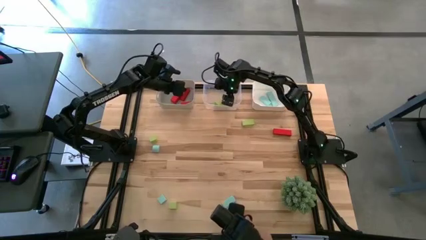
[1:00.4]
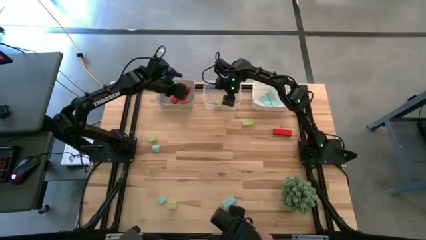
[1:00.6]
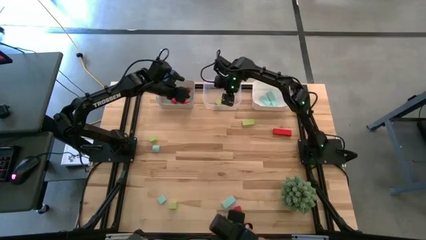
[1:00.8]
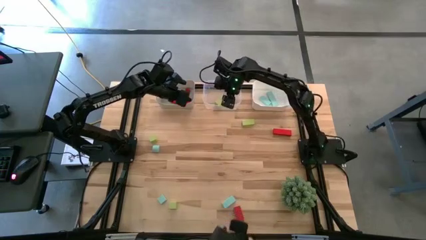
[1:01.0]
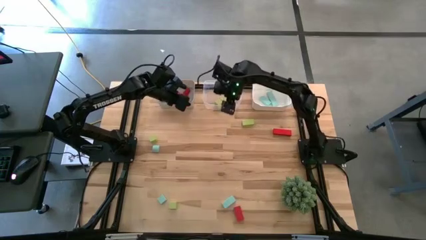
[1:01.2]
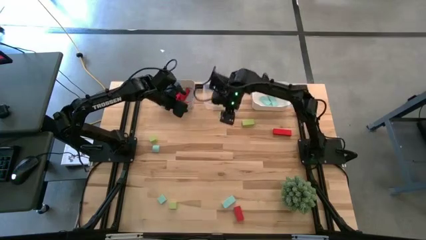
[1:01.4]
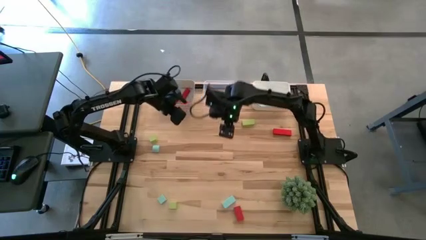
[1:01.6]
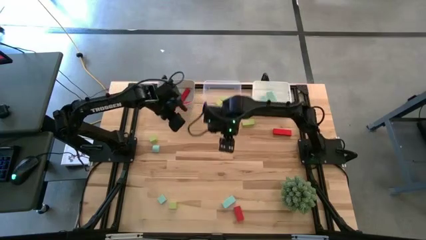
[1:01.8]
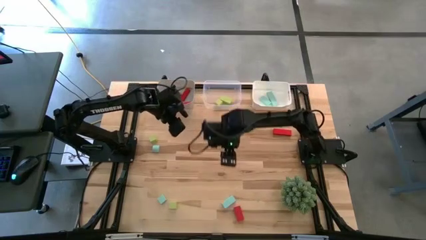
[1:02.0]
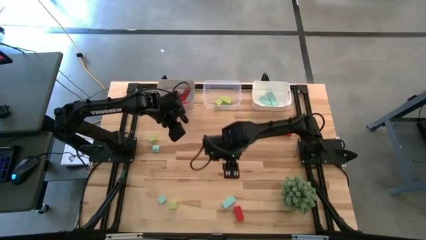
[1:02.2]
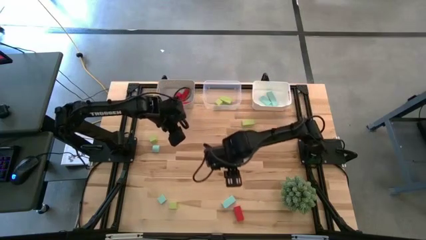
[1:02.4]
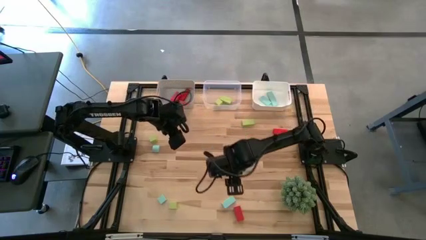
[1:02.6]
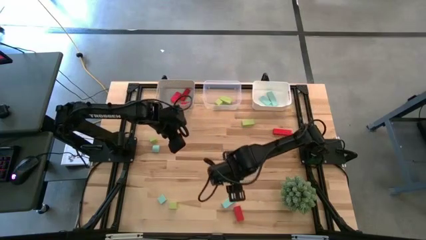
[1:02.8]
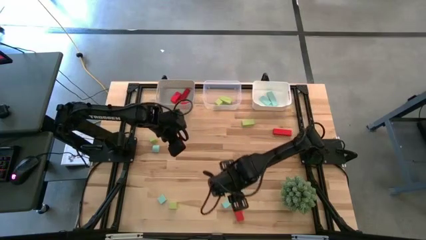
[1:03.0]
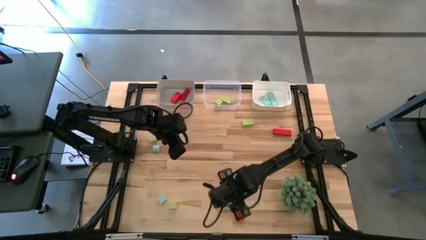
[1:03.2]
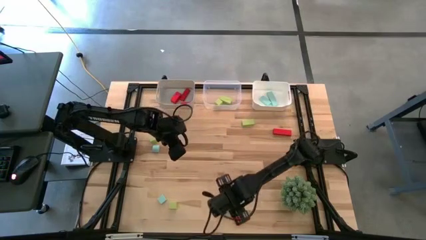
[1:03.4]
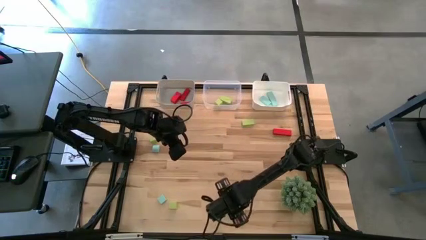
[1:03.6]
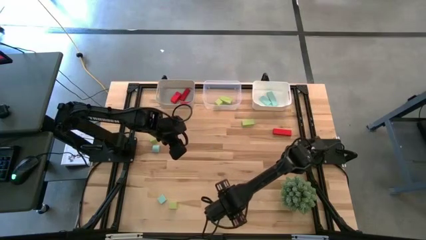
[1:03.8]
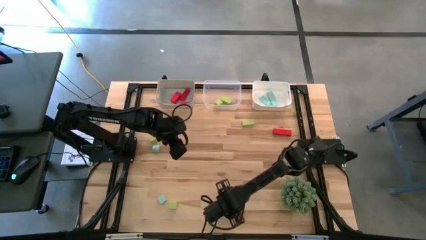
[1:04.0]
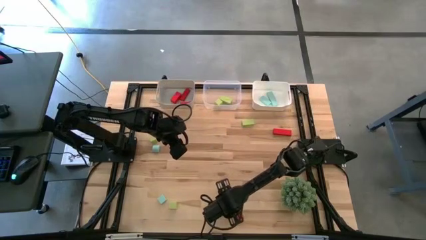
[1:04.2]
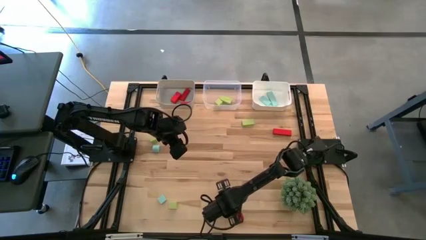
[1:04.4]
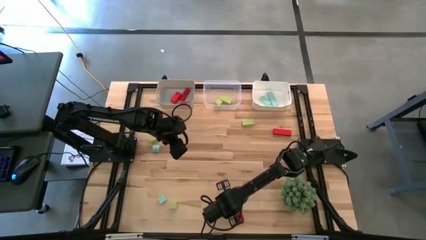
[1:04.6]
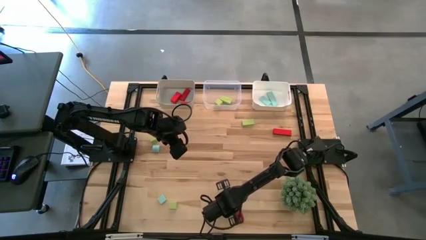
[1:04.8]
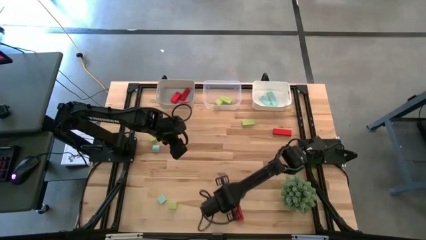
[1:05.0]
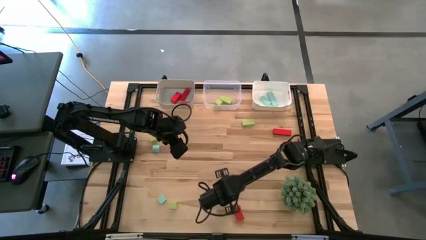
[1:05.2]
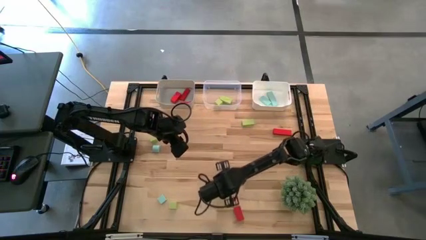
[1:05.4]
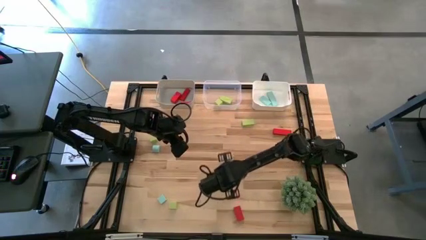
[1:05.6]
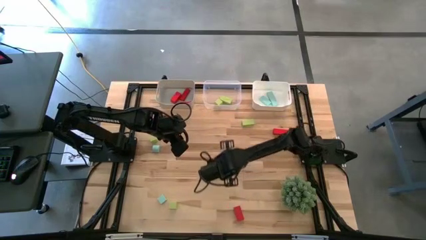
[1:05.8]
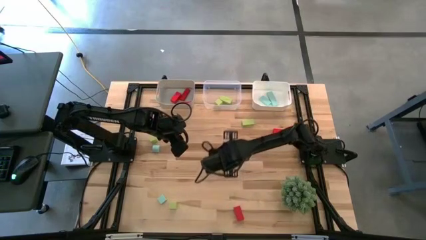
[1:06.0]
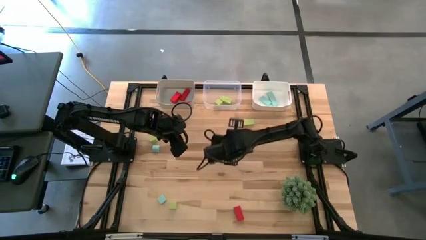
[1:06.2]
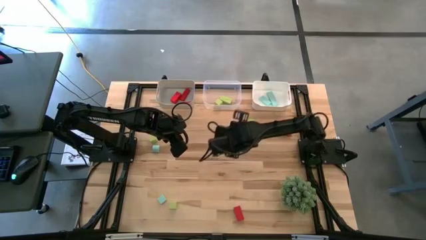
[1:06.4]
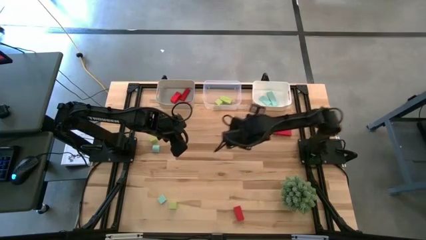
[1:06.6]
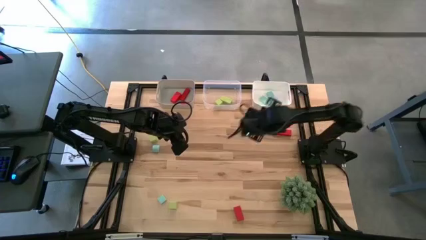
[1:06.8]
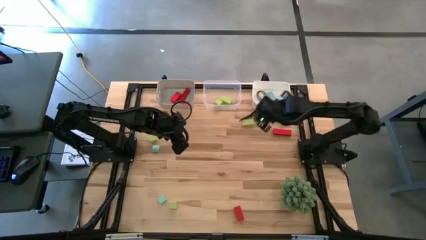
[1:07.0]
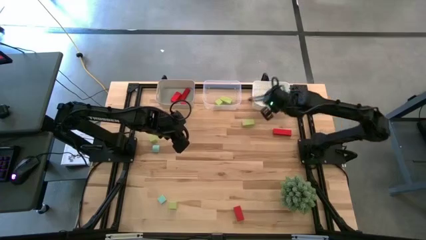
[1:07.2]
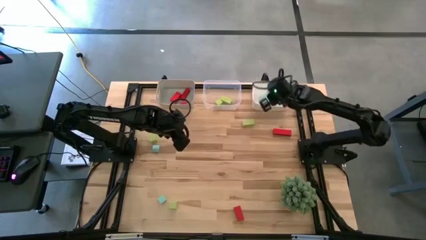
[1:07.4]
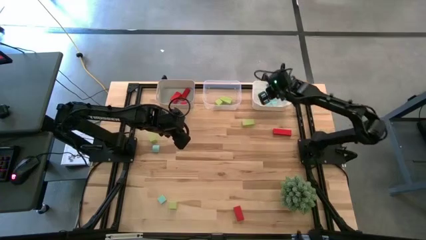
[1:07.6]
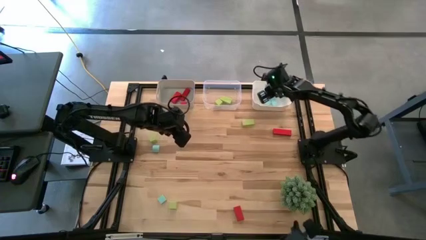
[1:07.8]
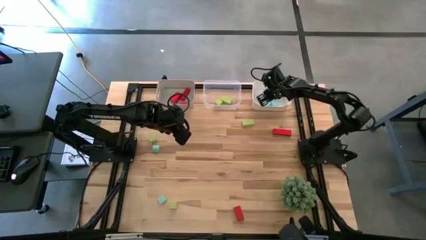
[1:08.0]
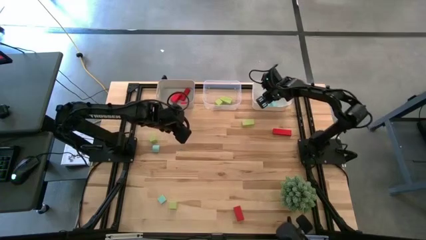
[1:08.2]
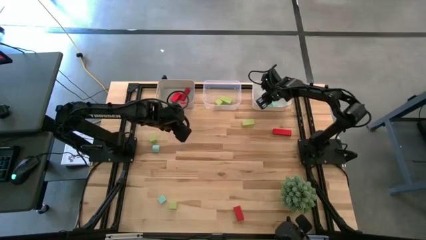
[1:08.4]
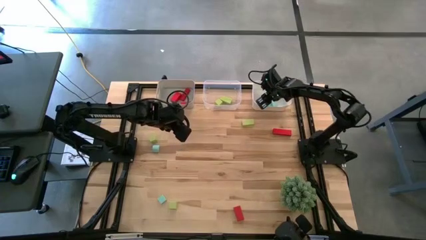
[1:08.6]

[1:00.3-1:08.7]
Task: Sort & place blocks by color
Put the blue block into the white bin

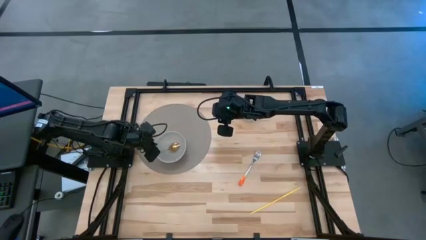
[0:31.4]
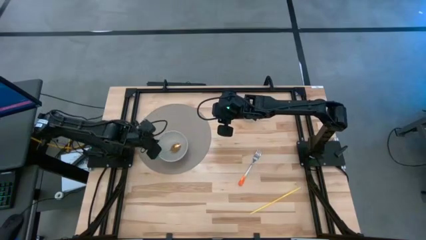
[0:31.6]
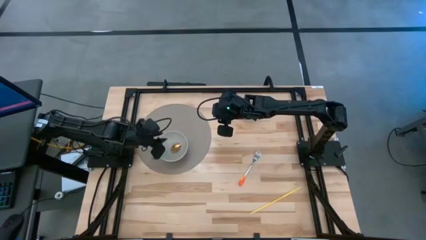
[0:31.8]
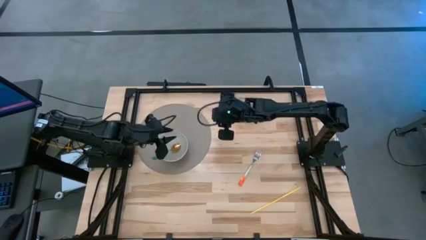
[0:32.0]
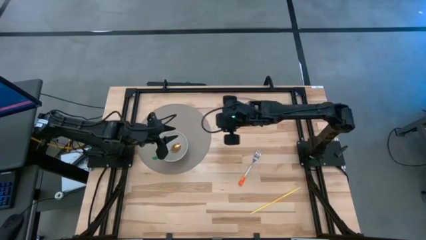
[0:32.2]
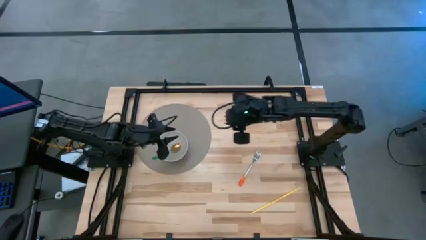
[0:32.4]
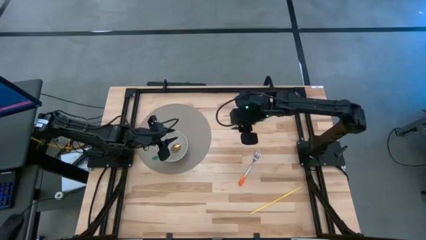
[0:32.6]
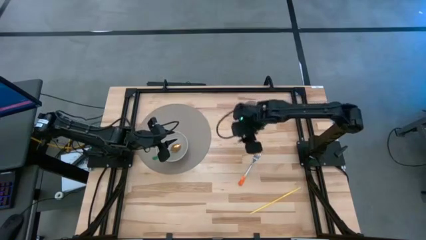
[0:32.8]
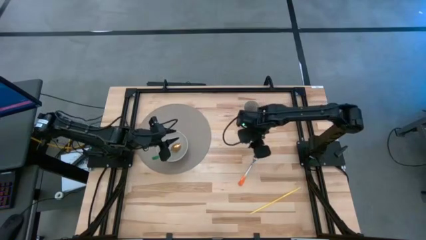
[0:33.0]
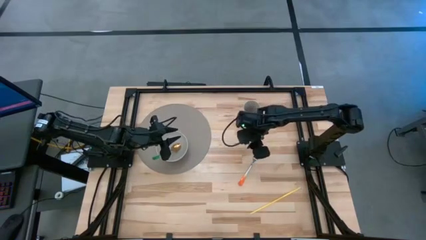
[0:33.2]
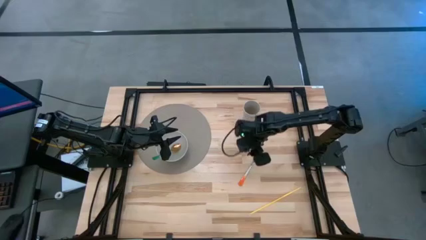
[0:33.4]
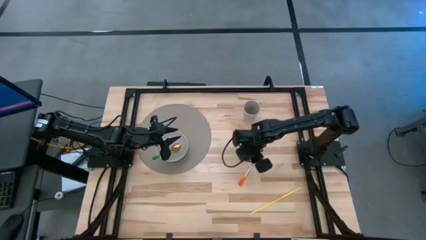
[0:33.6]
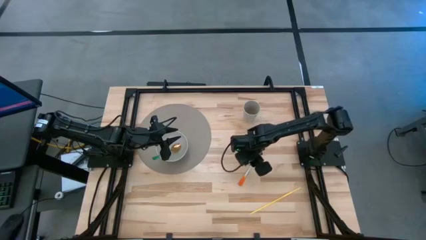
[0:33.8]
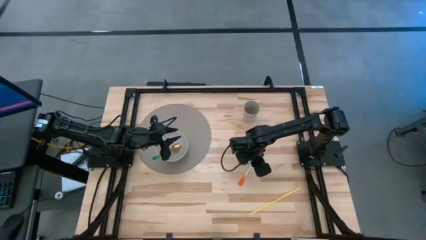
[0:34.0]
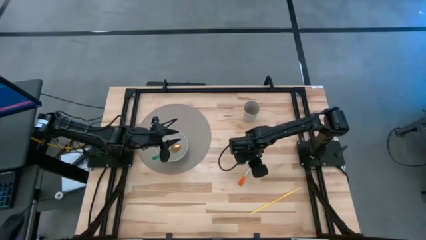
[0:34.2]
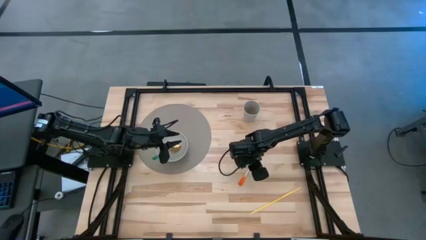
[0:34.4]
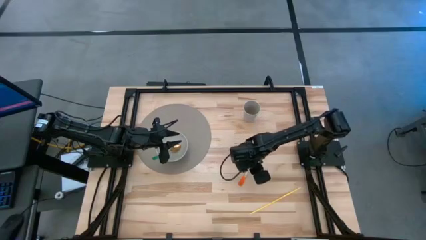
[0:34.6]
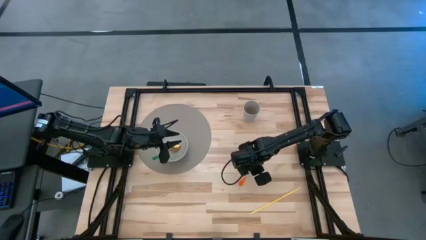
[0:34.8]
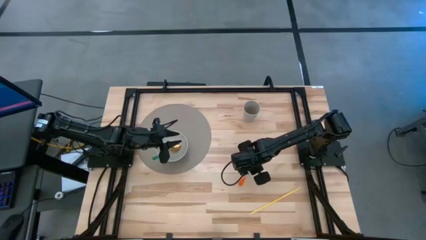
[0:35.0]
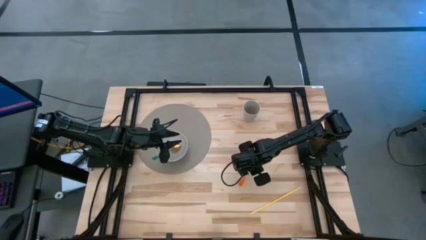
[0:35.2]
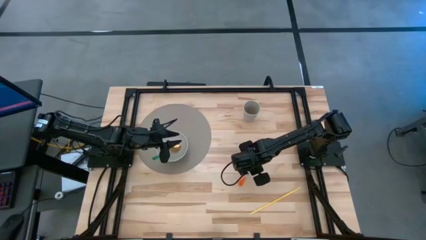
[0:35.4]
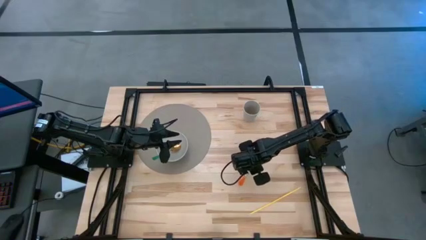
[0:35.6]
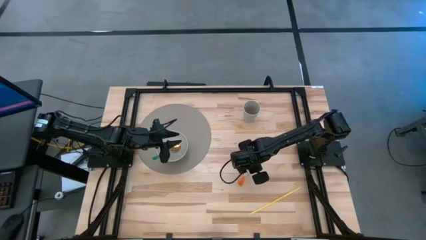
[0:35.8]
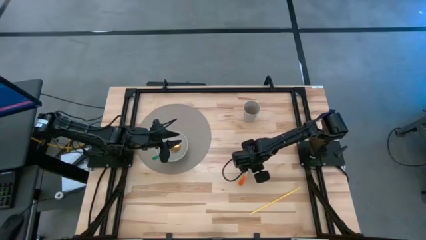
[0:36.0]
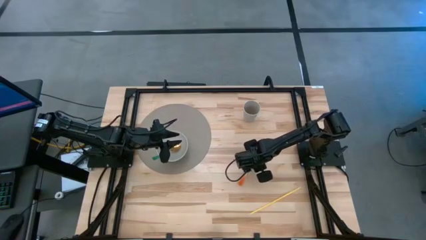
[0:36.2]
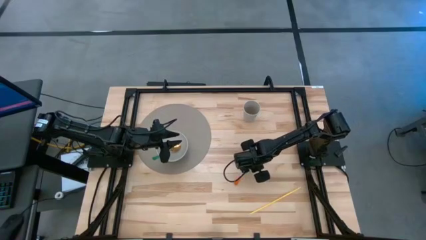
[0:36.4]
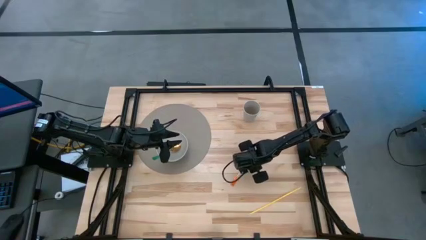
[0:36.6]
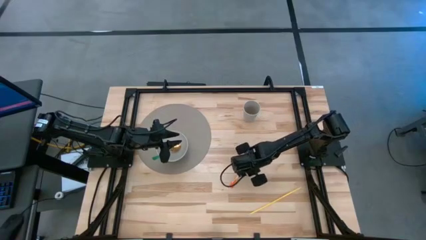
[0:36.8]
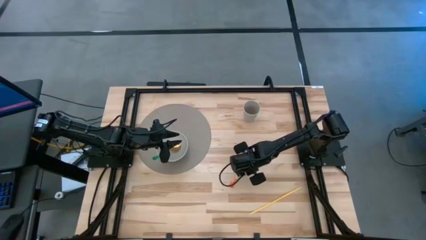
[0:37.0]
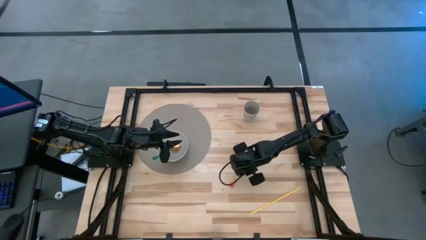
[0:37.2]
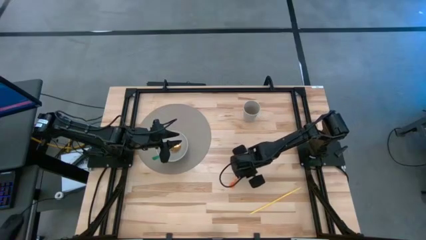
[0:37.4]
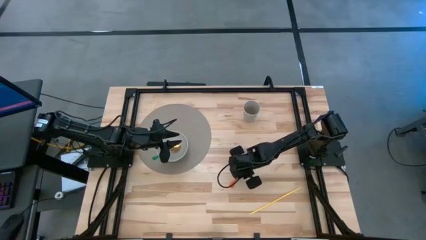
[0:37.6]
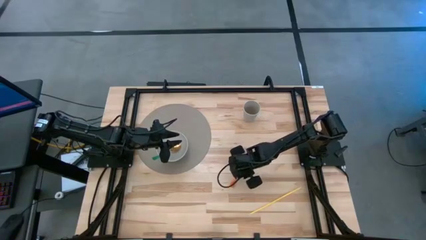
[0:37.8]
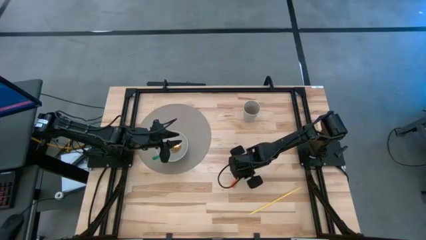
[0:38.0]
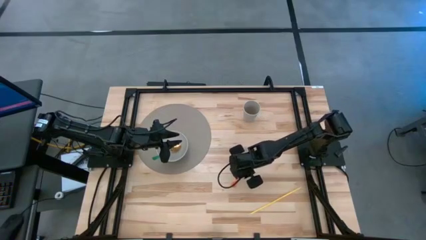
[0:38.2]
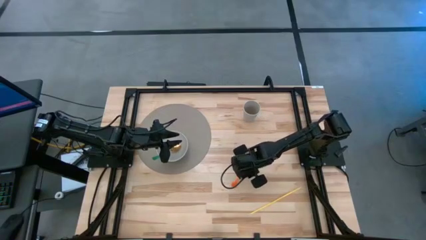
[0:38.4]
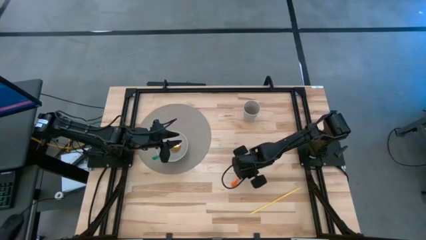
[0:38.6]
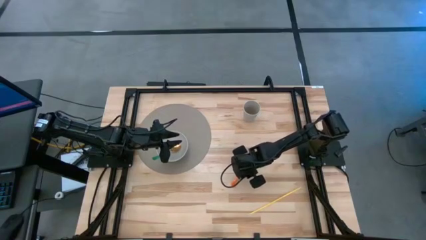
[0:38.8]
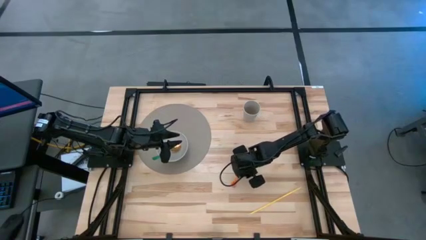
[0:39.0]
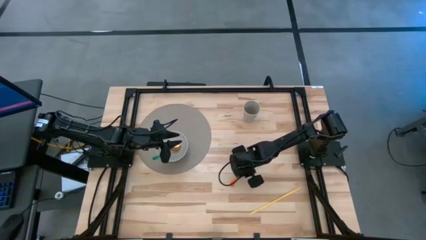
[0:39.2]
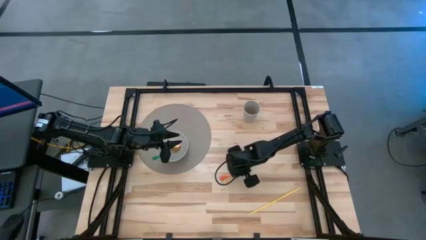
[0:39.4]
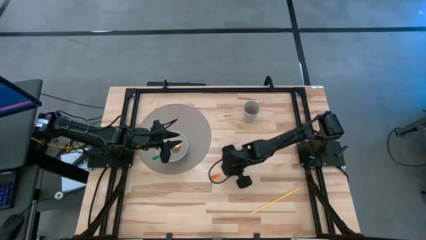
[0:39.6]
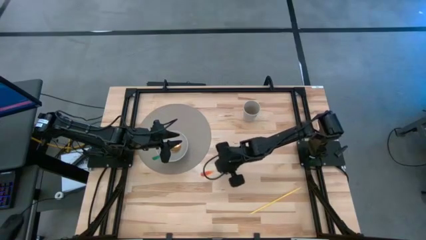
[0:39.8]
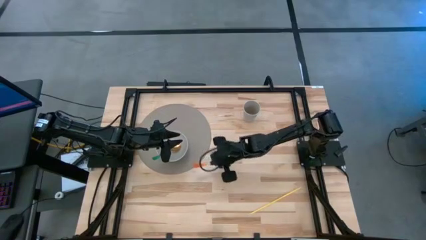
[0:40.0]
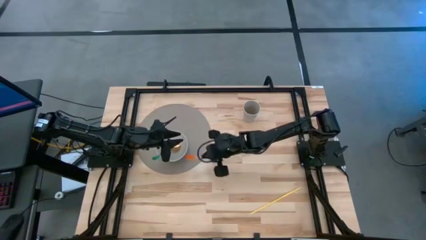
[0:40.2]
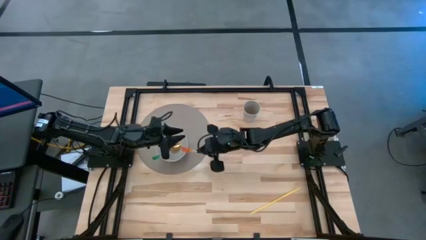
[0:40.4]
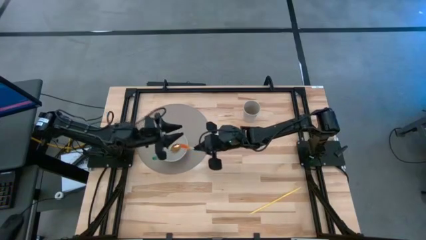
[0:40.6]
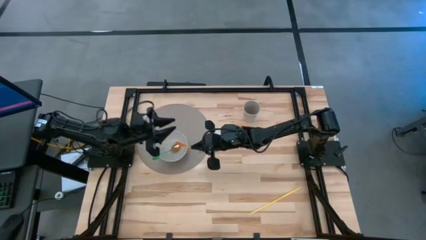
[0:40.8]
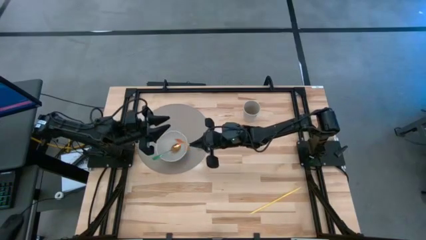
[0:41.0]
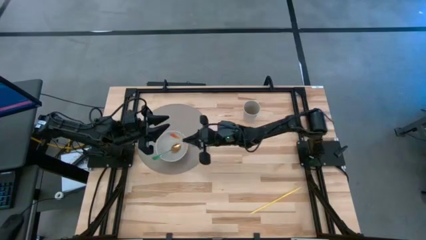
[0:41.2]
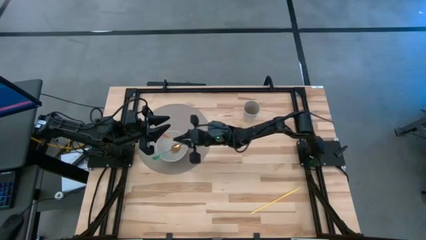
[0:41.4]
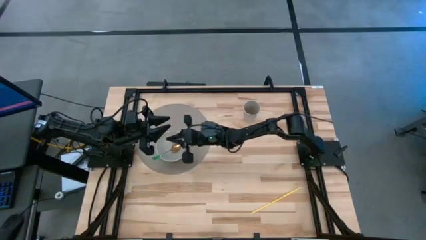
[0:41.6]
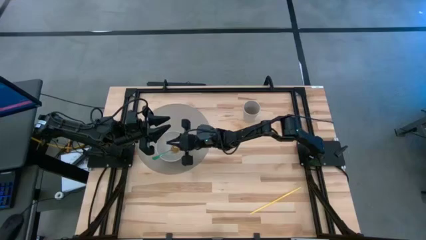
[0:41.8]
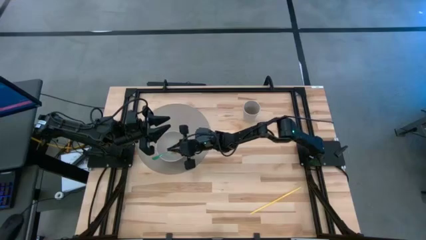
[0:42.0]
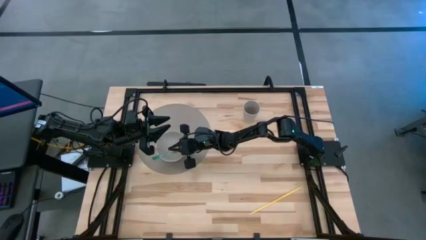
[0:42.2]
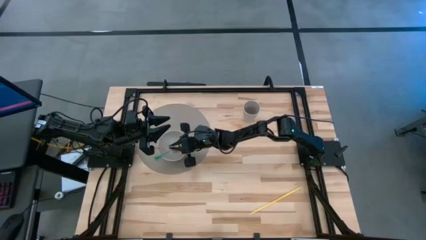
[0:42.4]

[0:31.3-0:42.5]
Task: Pick & Place Utensil
Put the orange fork into the white bowl
